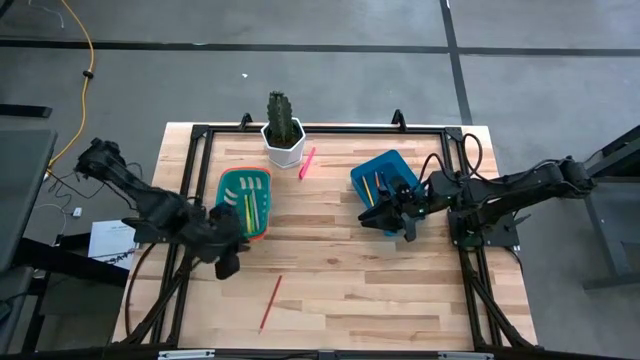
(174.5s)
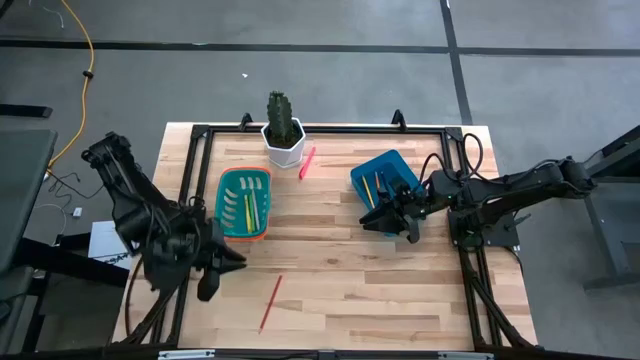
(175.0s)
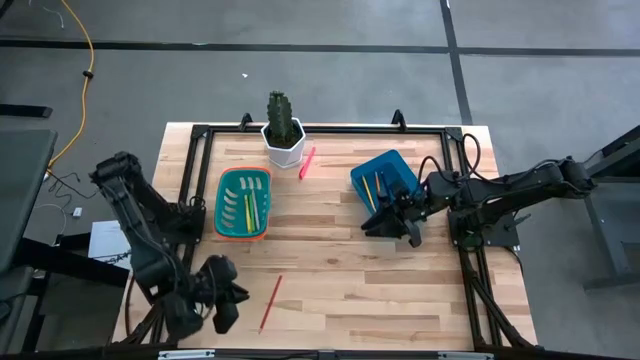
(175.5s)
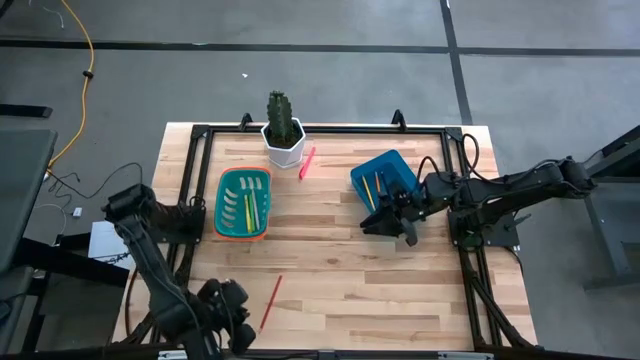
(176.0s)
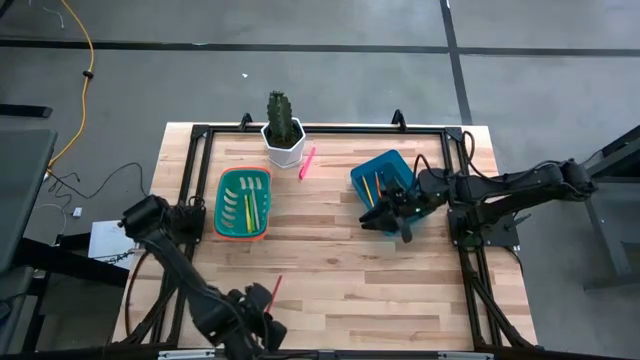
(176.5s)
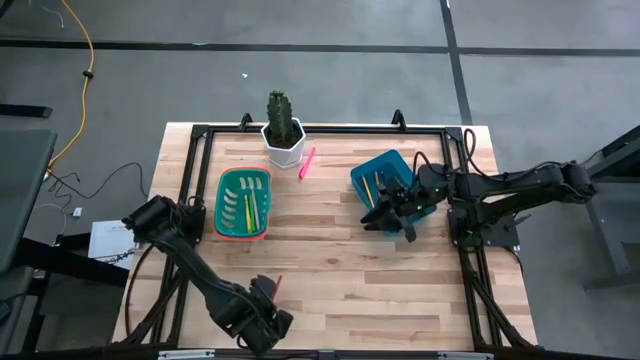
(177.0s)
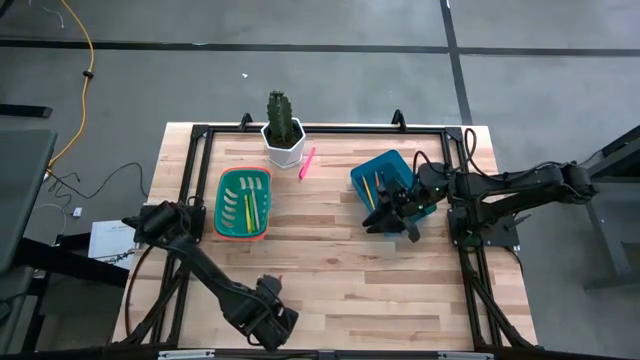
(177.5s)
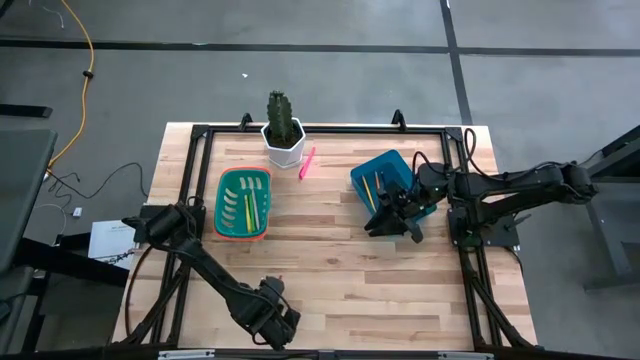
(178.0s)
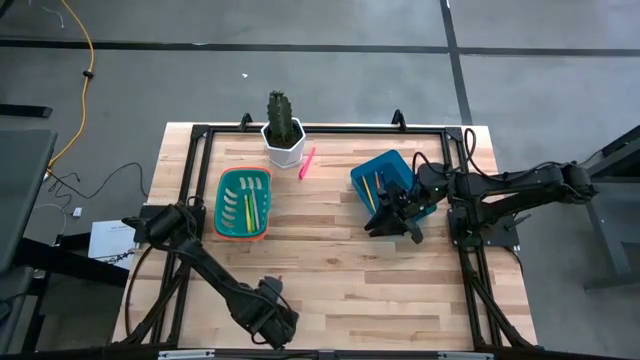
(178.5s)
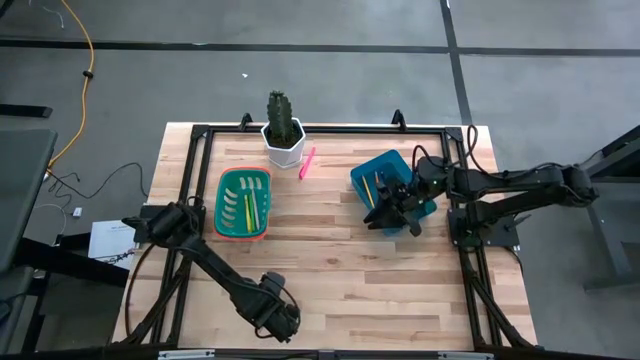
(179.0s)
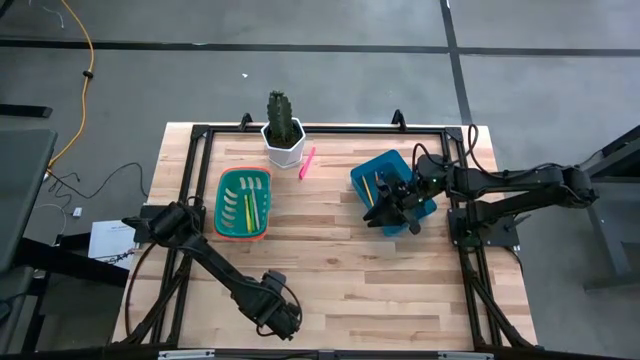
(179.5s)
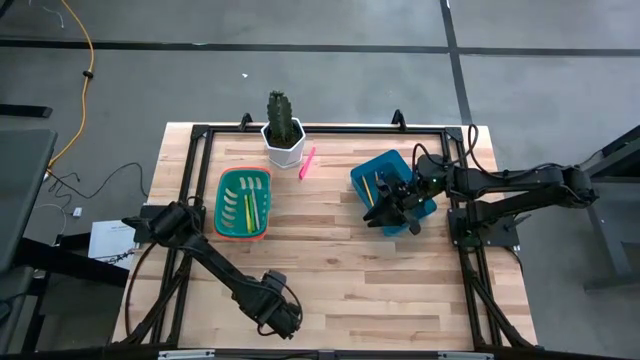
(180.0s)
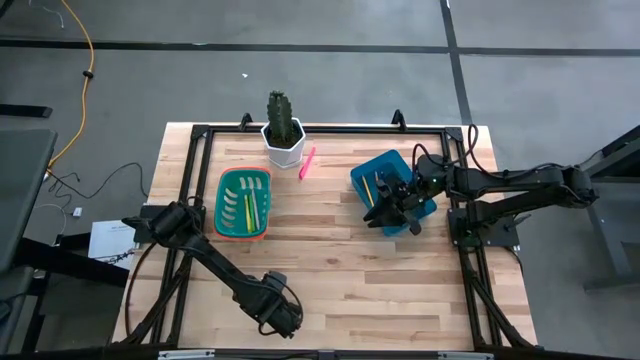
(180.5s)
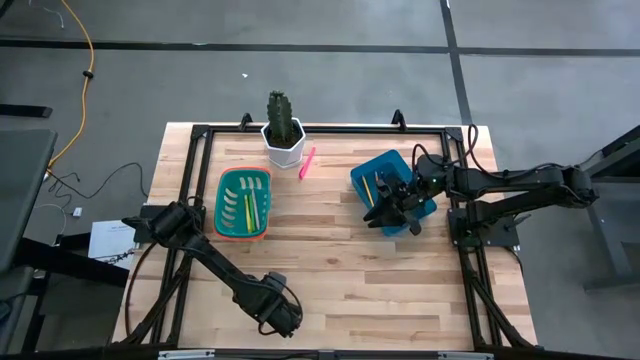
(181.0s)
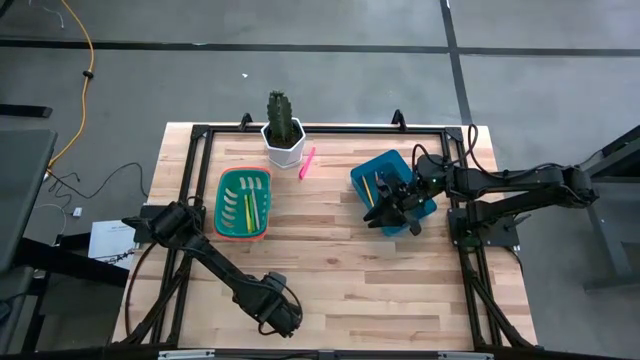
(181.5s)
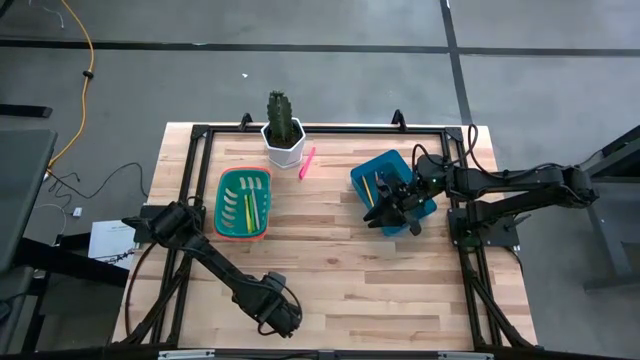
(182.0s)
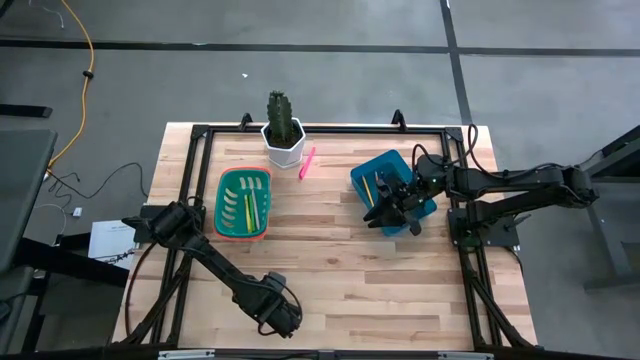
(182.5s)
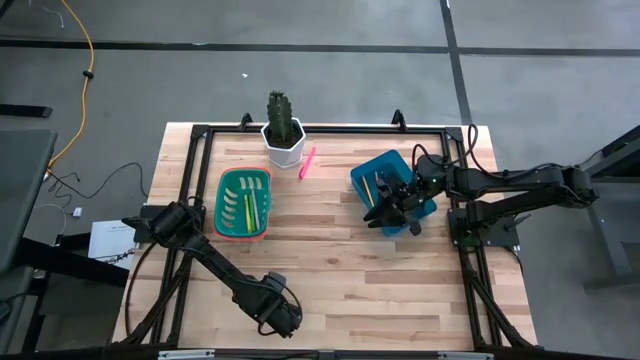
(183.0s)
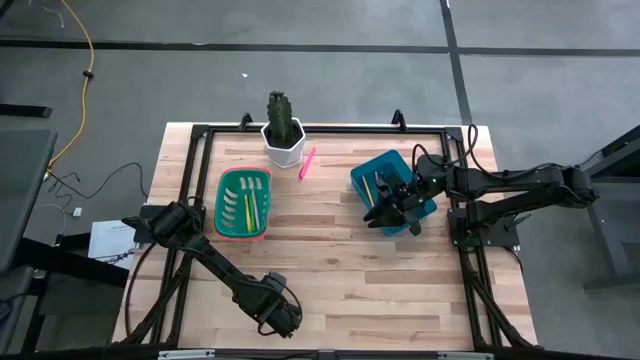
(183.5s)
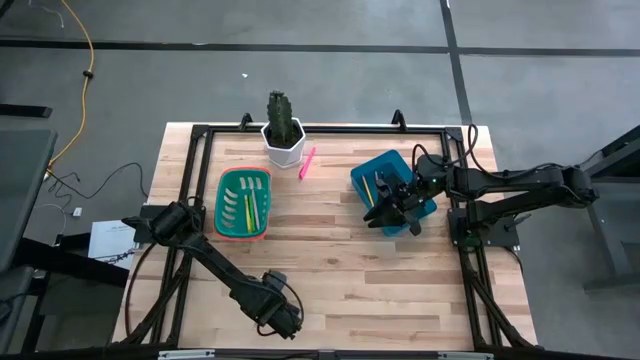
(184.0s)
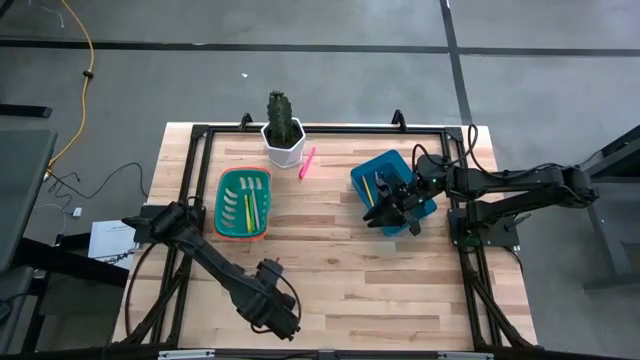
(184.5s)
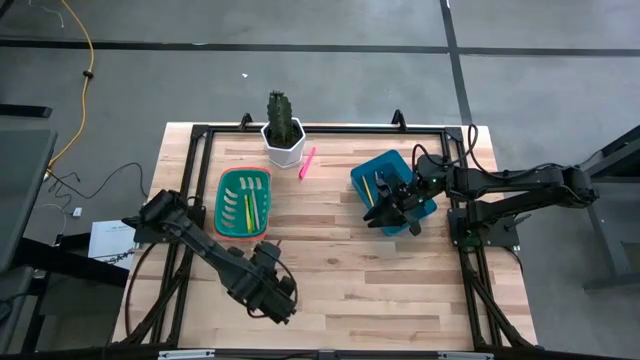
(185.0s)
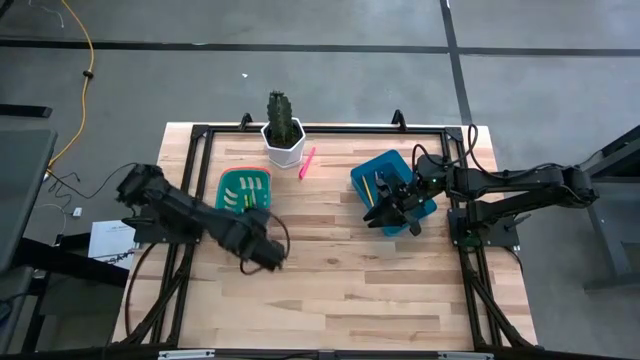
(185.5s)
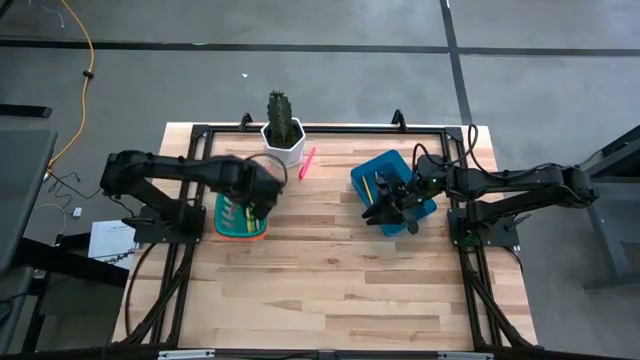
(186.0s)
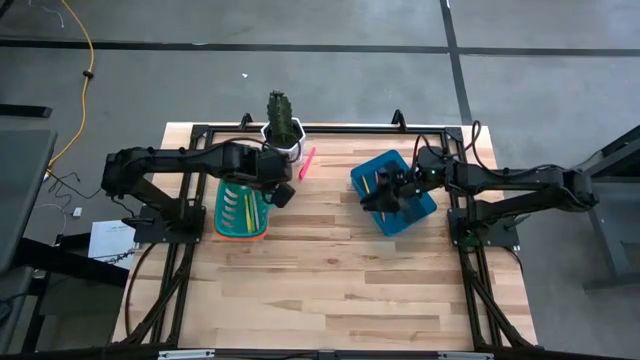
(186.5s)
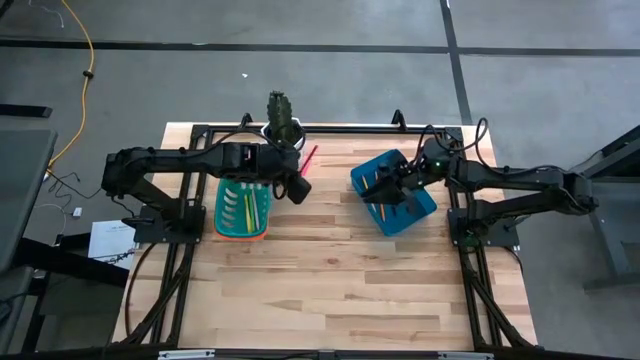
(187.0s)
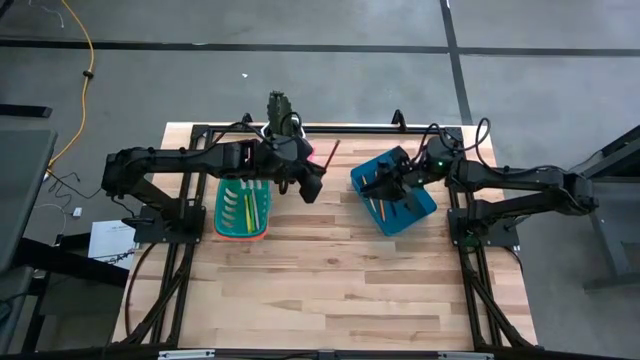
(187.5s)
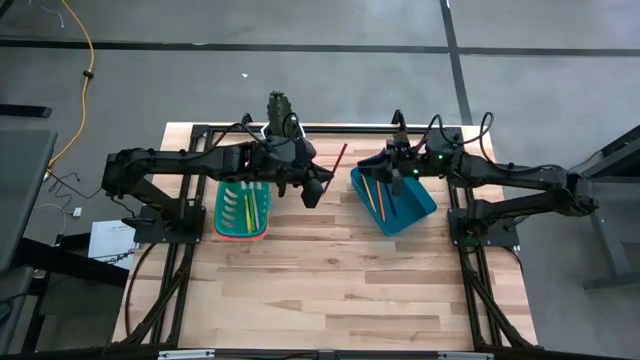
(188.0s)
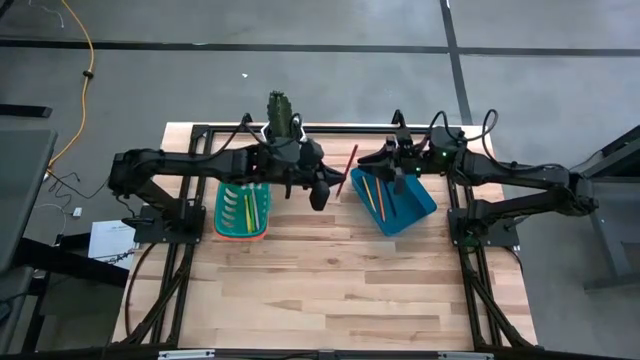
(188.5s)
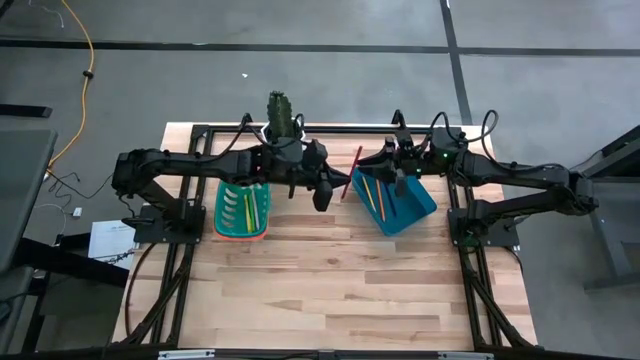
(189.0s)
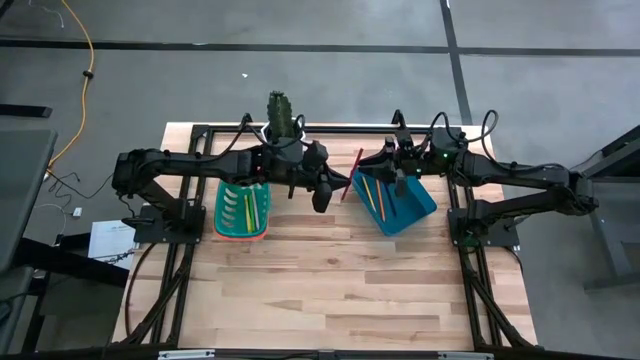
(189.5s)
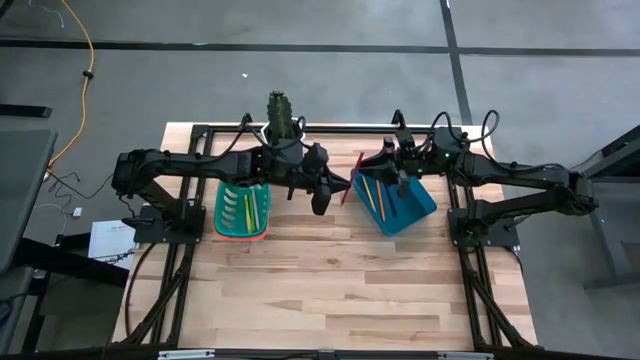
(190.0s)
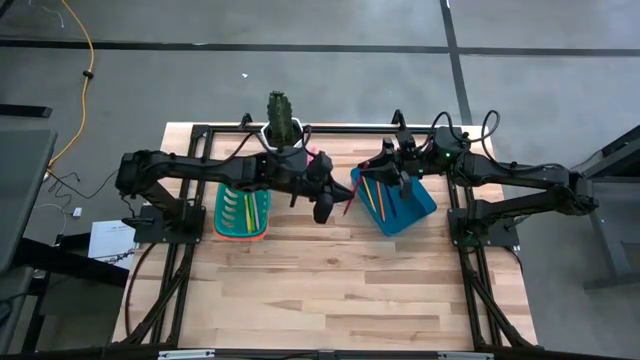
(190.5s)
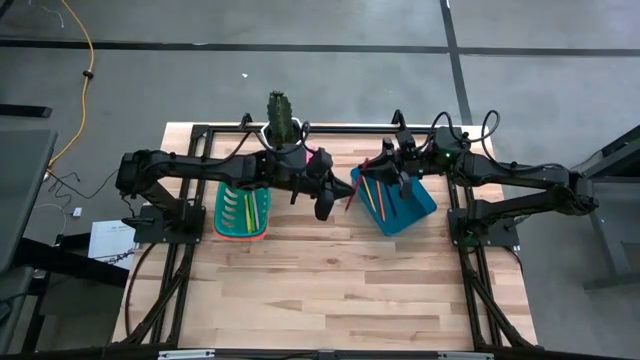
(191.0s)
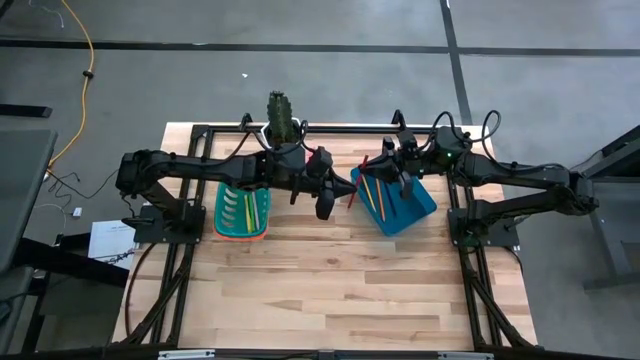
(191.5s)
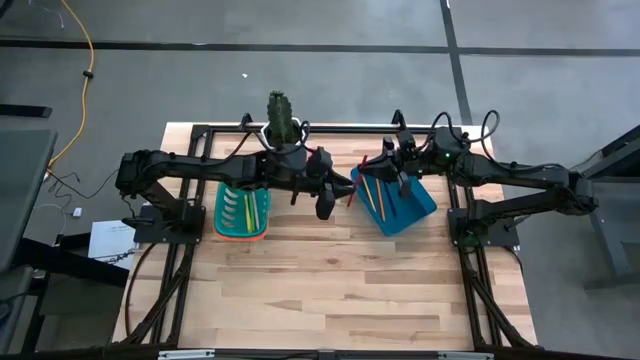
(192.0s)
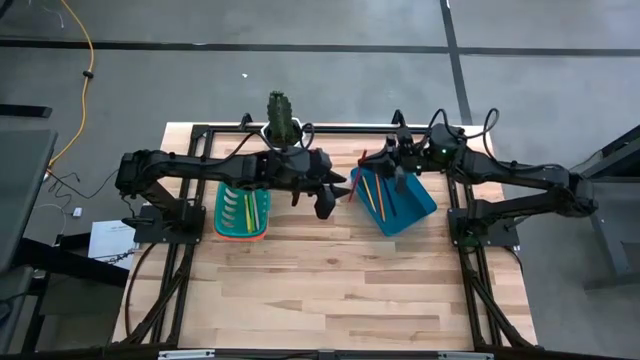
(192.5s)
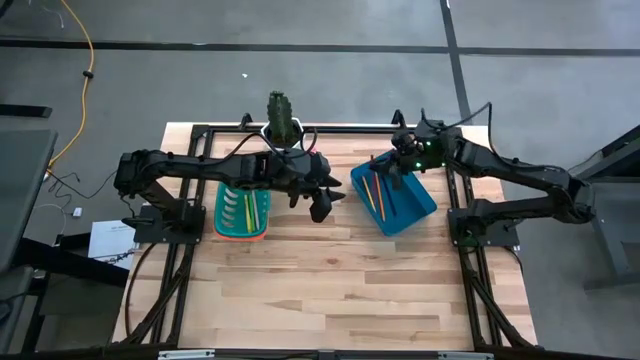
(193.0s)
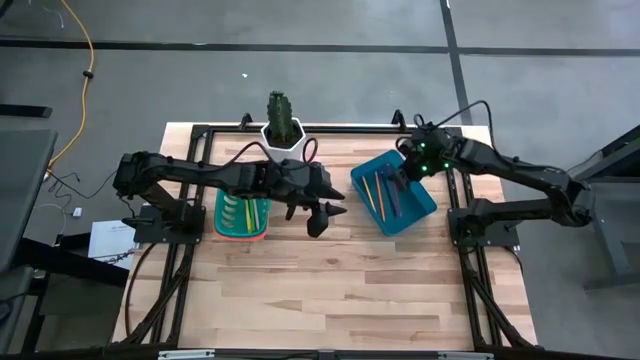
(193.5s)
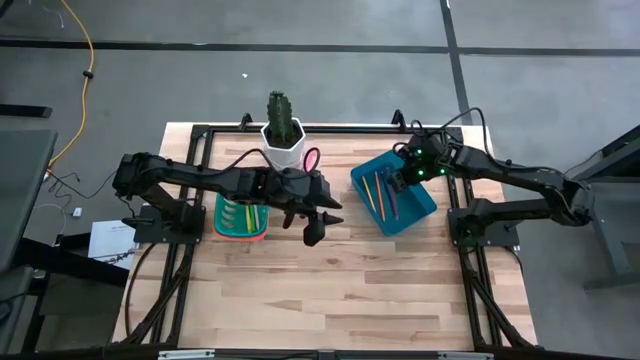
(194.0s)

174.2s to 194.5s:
Task: Sort pens & pencils
Put the red pencil into the blue bin
